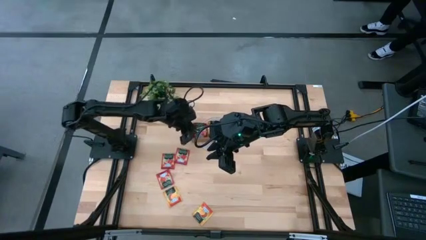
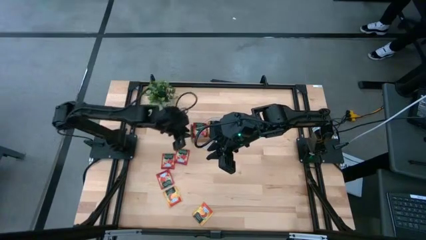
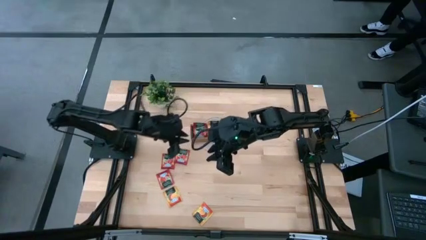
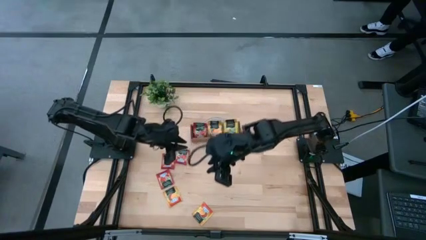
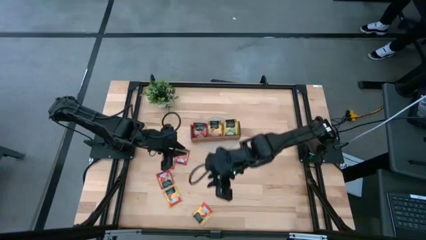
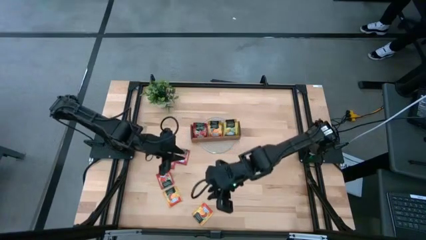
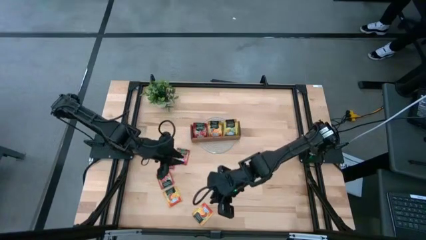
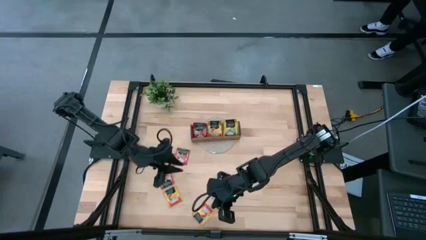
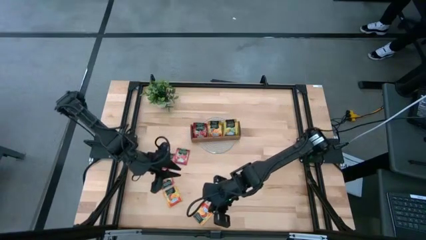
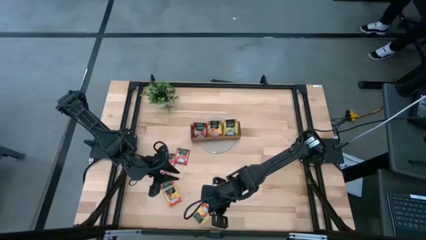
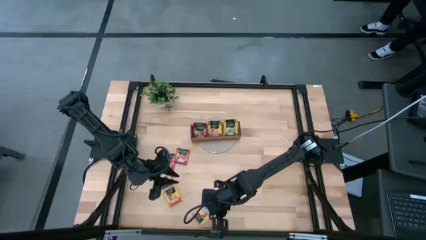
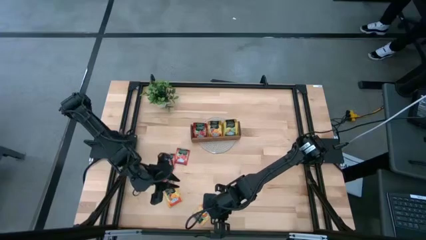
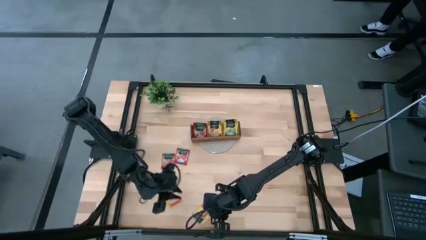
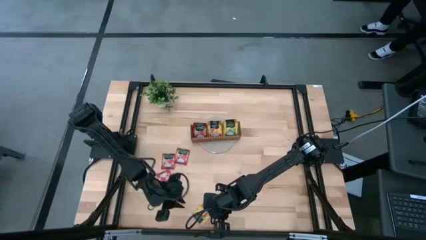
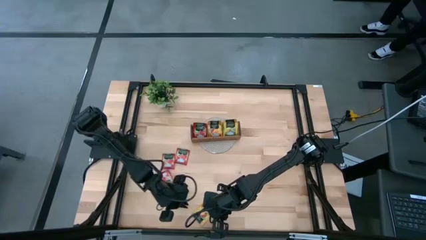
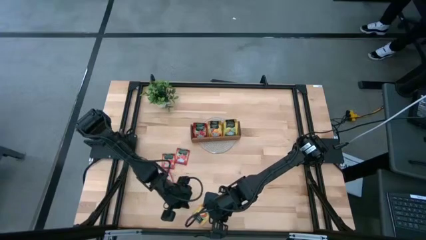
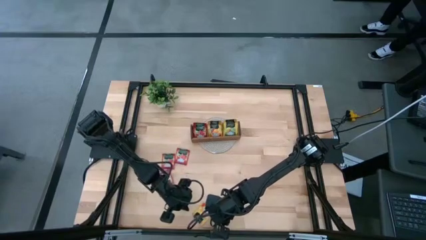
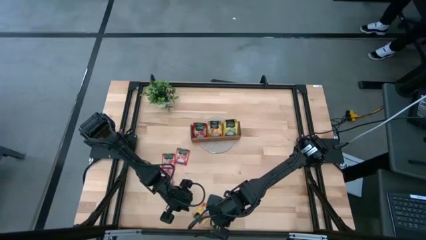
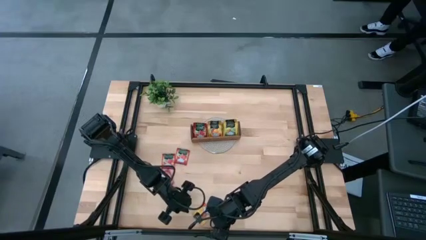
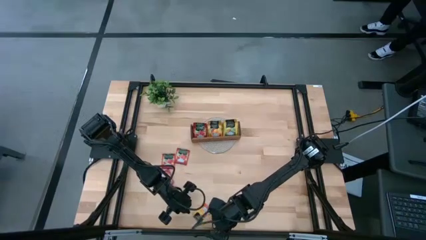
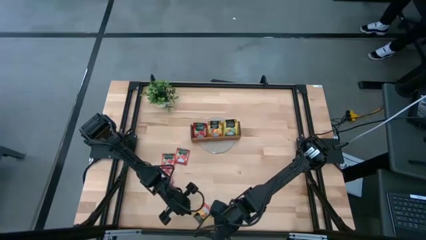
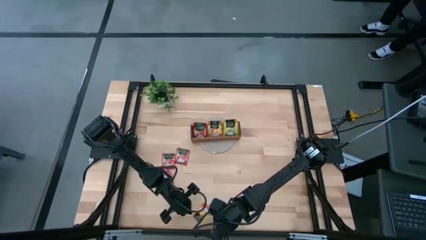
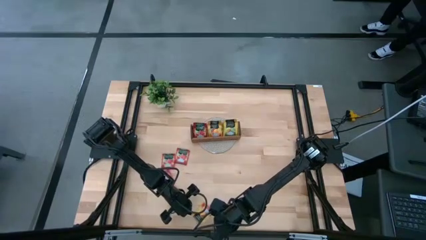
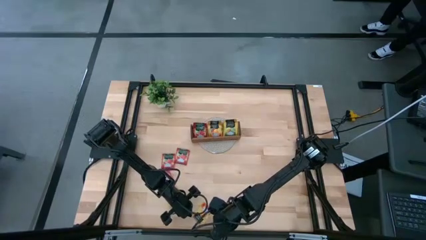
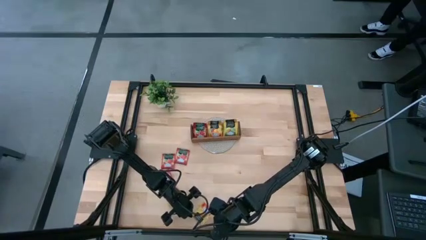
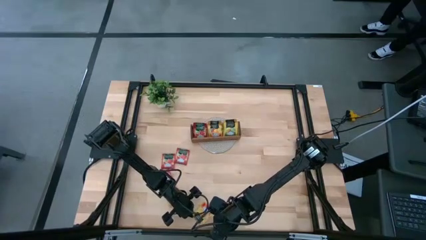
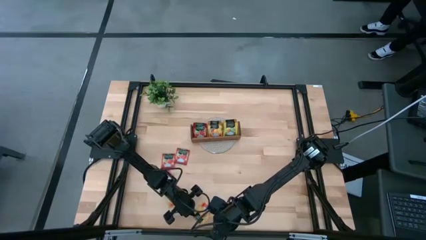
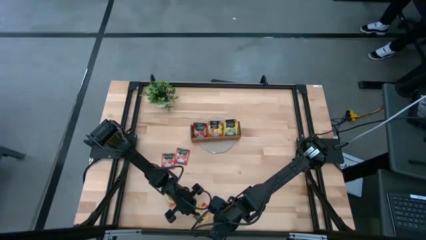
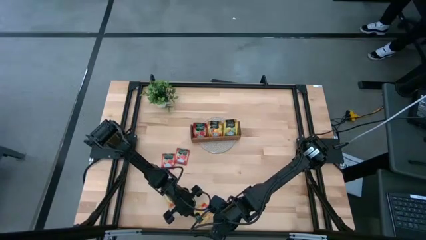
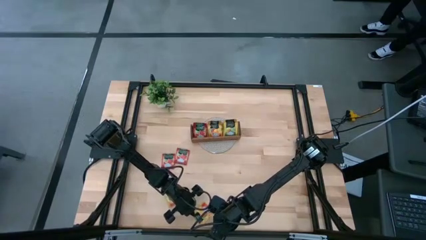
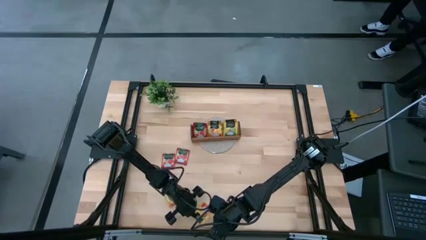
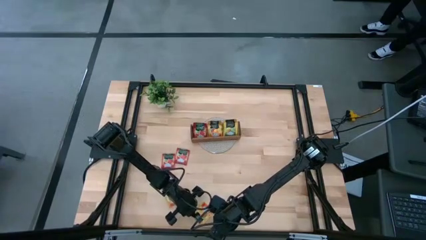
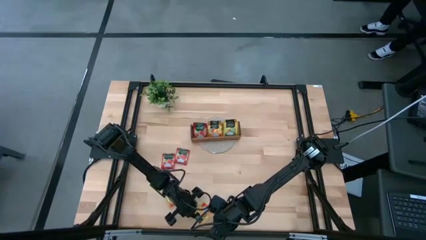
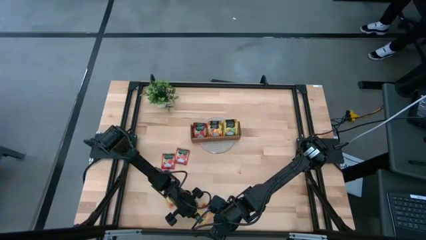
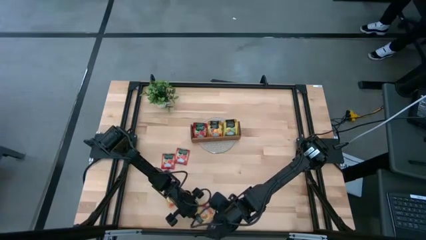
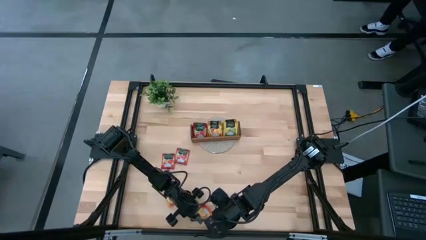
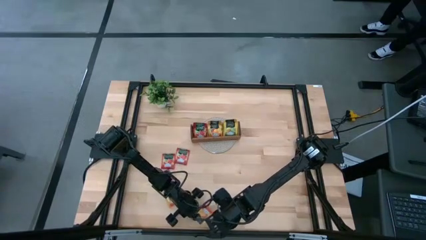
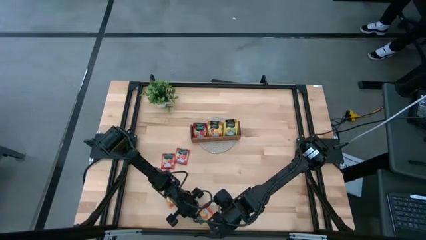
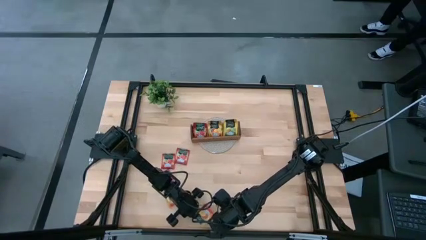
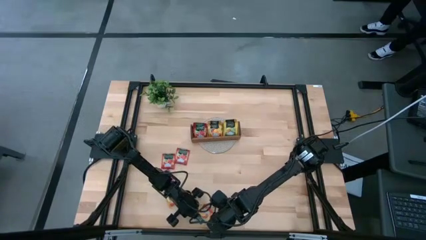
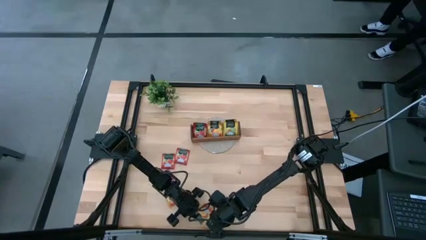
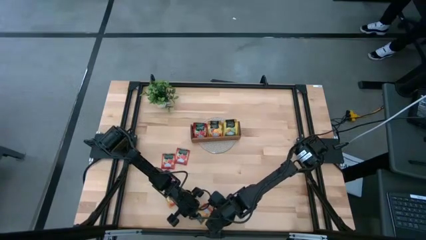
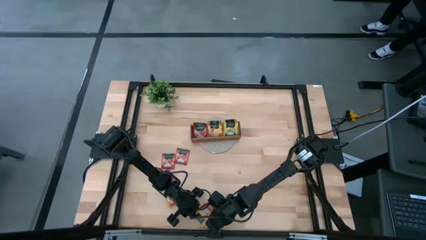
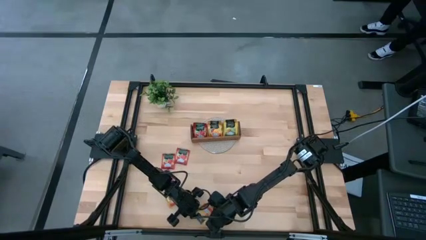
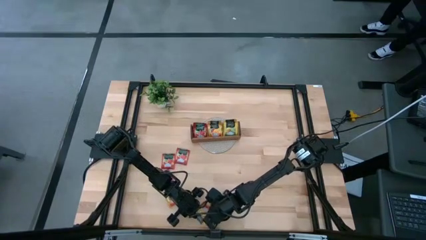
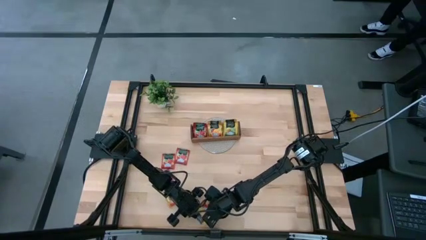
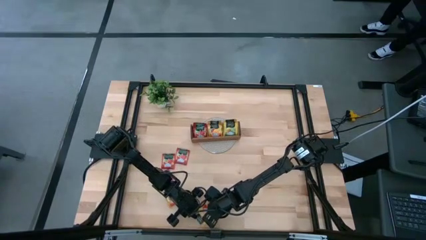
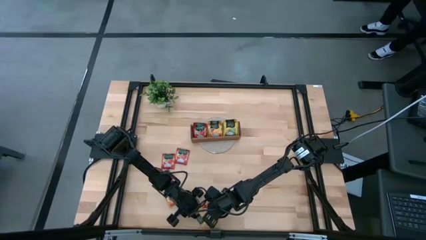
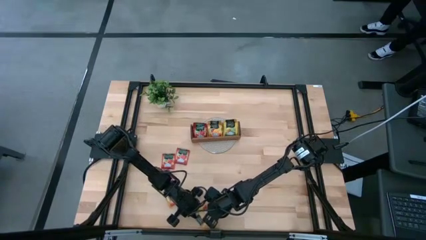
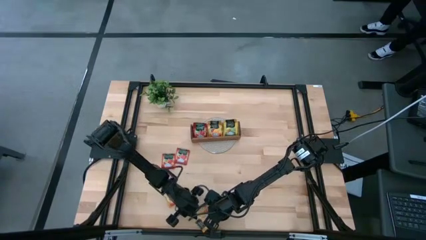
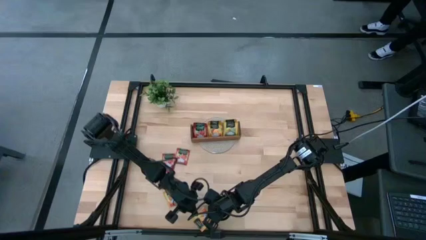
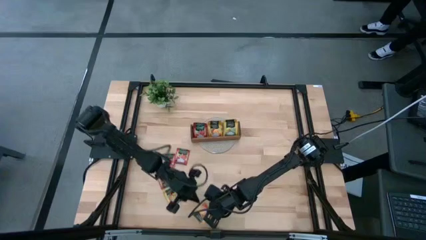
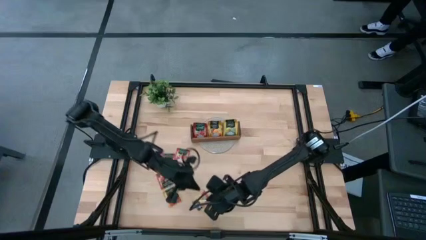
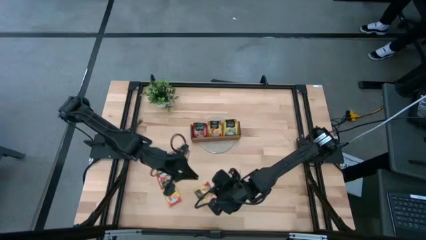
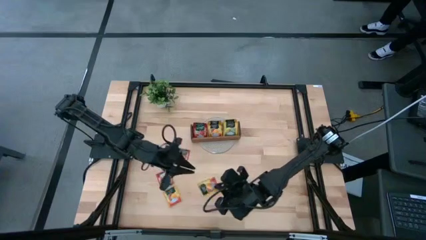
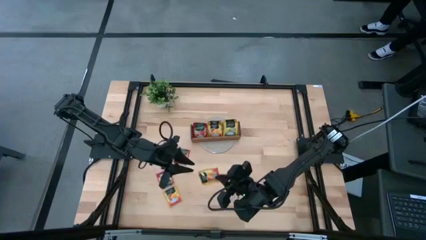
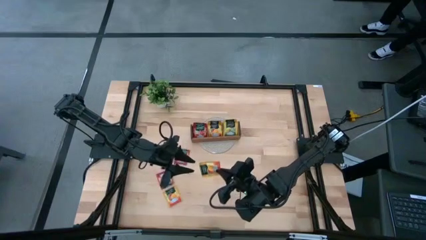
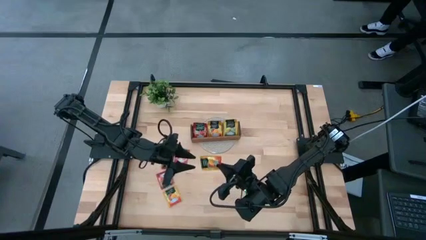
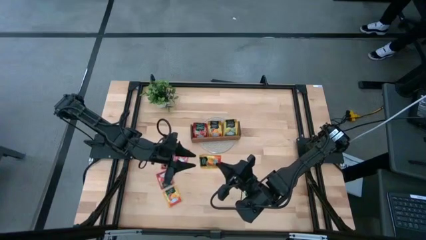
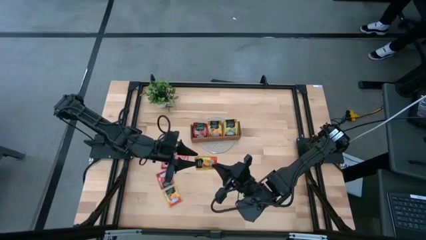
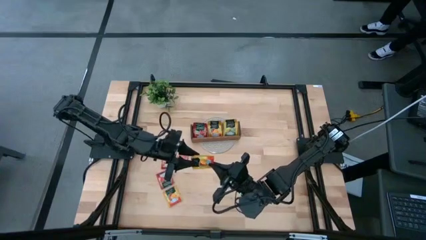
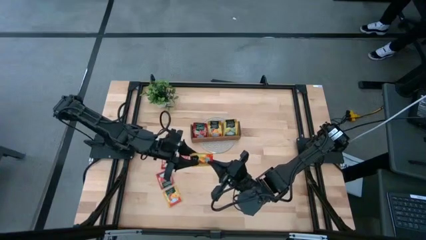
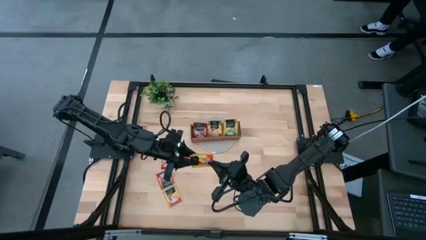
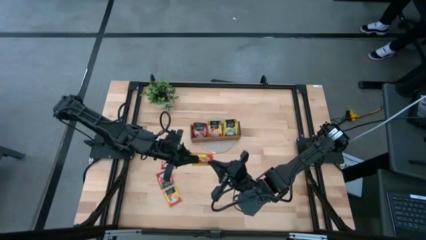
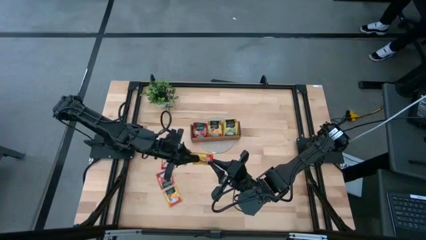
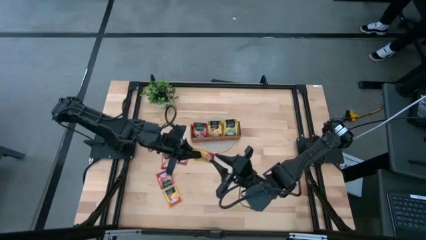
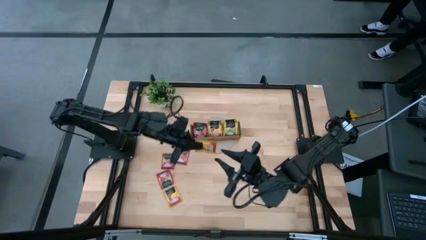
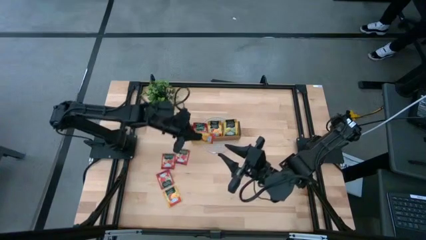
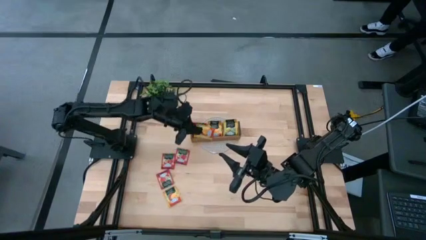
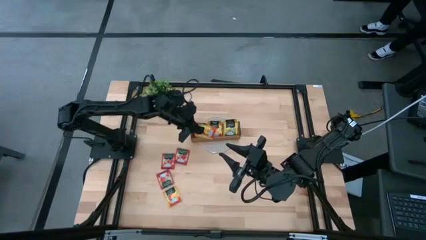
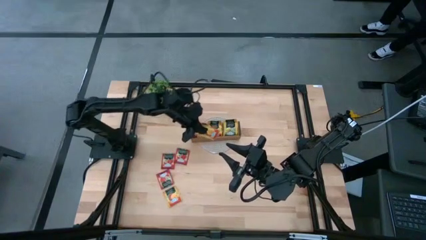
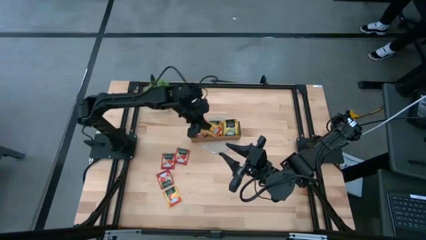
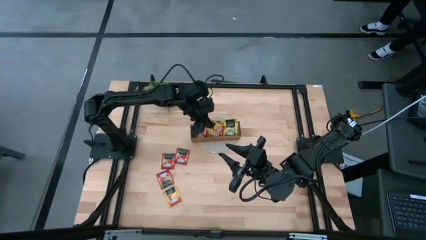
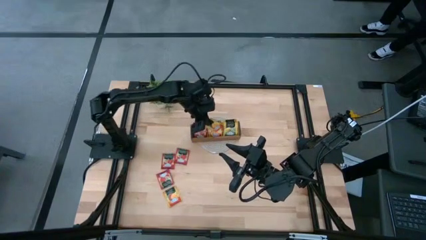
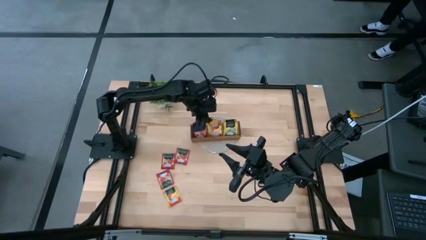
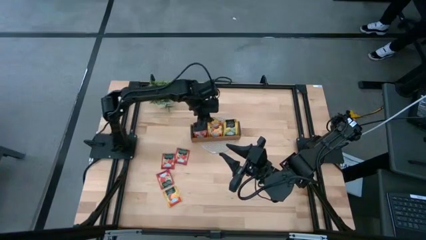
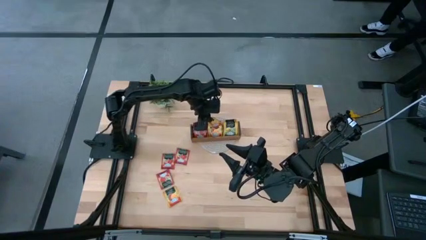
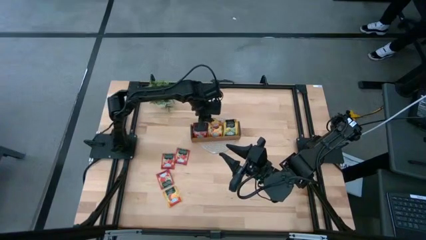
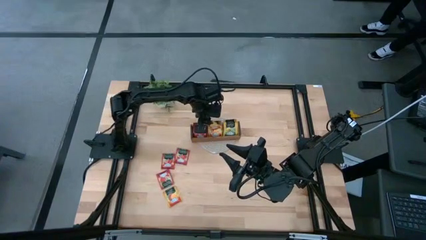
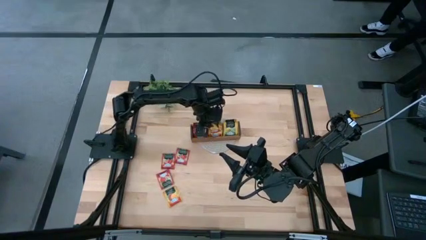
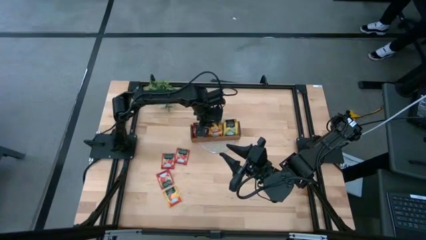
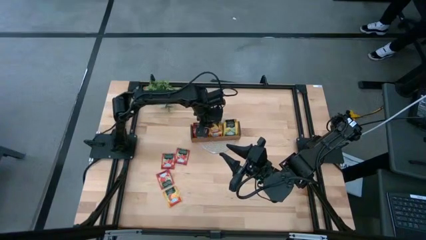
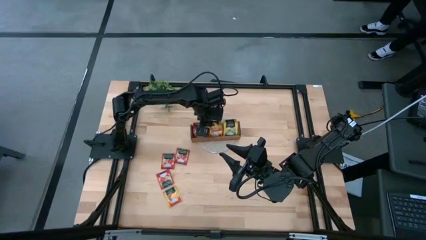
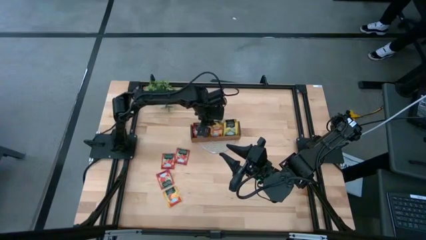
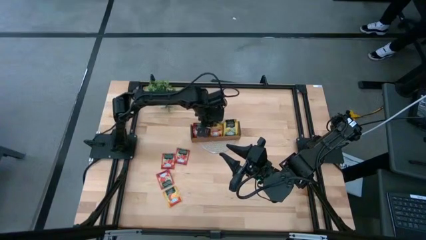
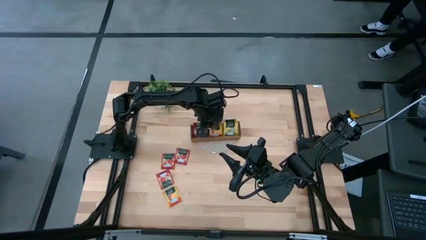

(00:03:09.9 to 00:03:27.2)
Task: Pick & Place Tea
Put the orange tea bag into the middle section of the wooden organizer
